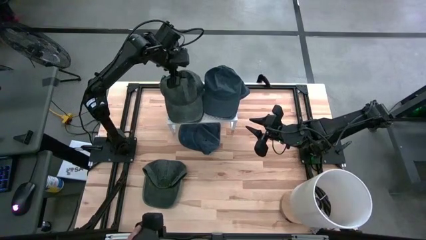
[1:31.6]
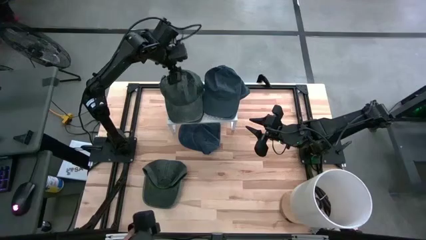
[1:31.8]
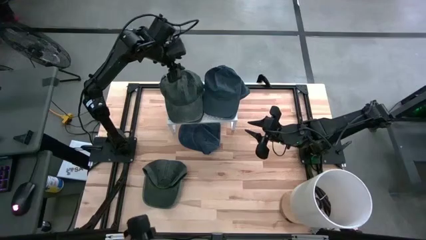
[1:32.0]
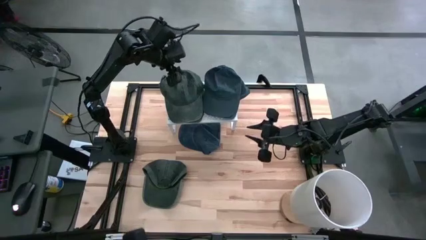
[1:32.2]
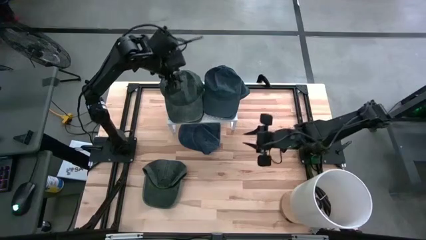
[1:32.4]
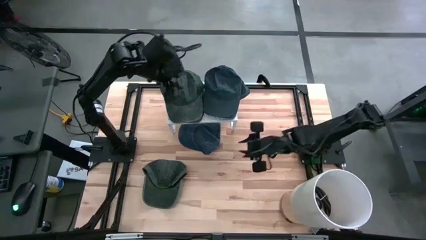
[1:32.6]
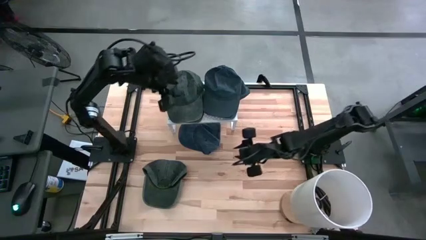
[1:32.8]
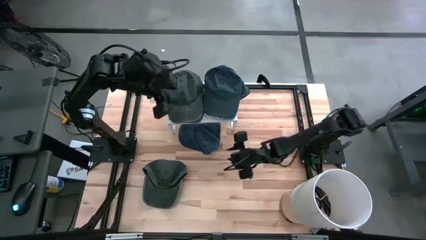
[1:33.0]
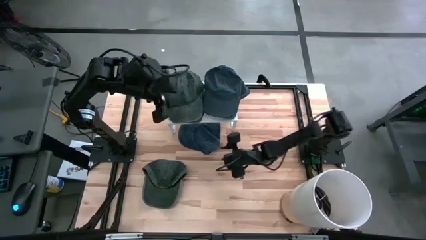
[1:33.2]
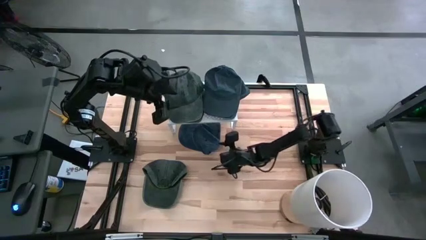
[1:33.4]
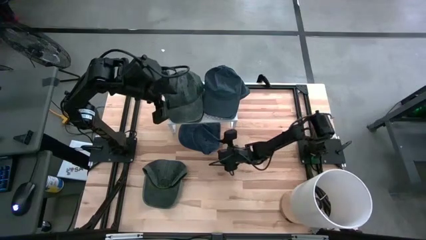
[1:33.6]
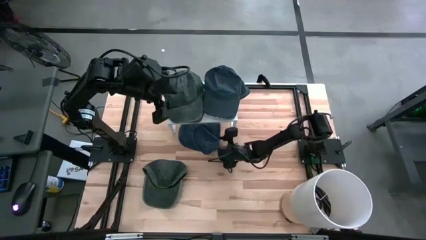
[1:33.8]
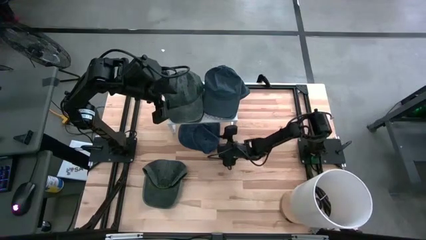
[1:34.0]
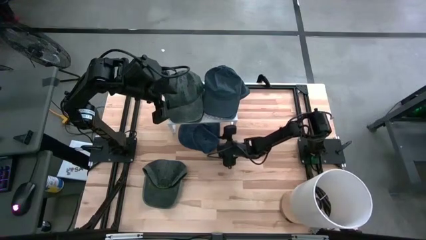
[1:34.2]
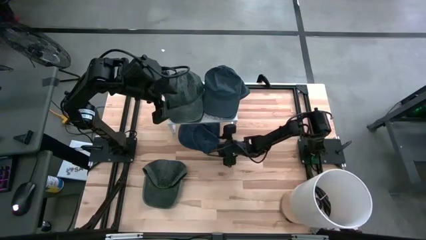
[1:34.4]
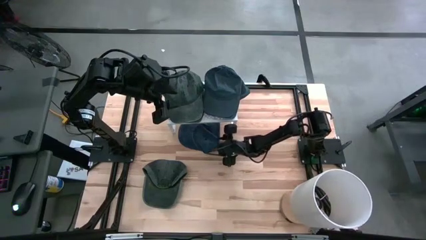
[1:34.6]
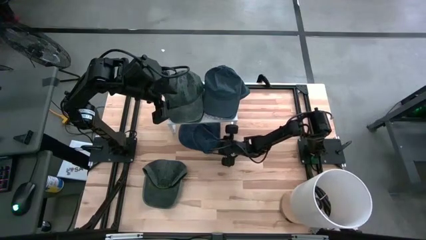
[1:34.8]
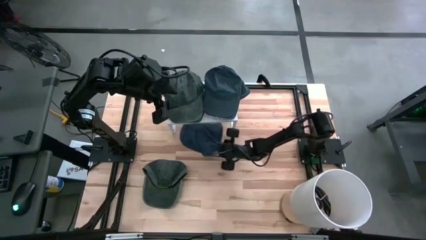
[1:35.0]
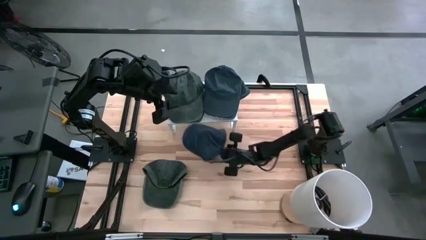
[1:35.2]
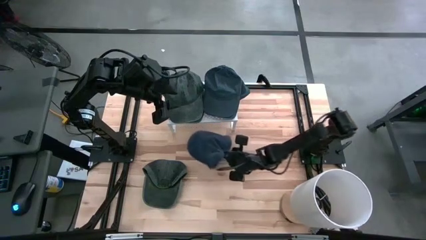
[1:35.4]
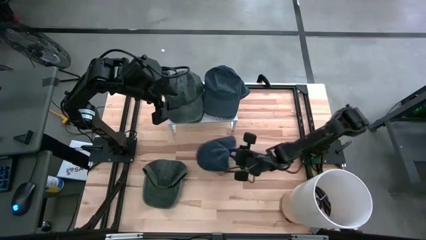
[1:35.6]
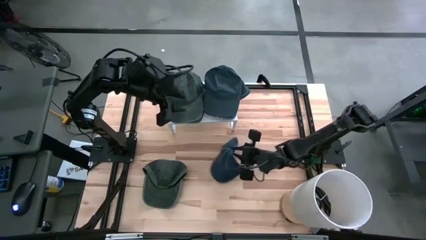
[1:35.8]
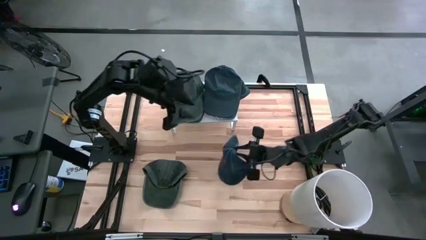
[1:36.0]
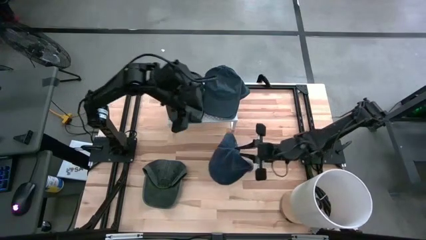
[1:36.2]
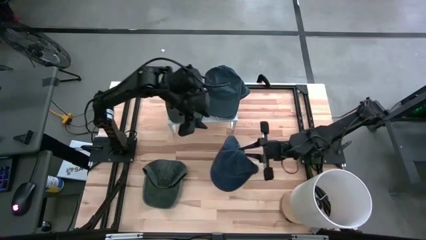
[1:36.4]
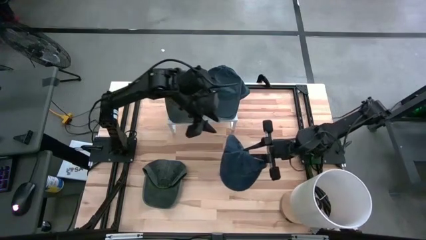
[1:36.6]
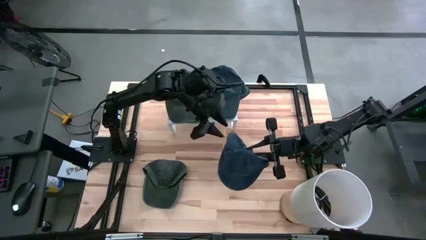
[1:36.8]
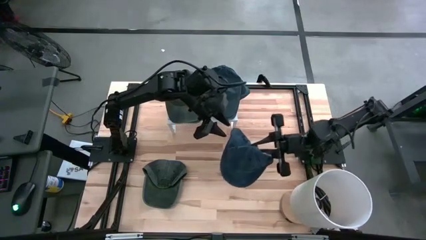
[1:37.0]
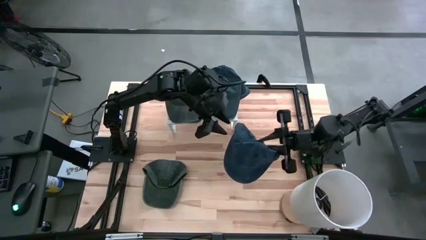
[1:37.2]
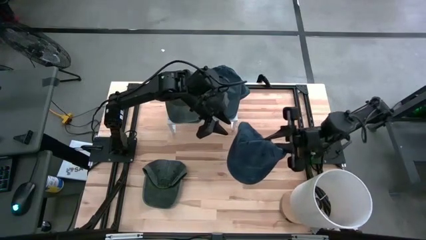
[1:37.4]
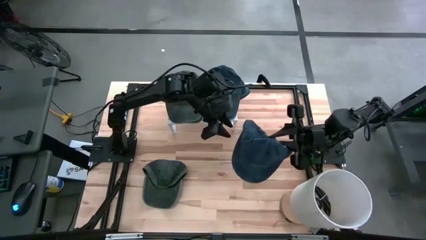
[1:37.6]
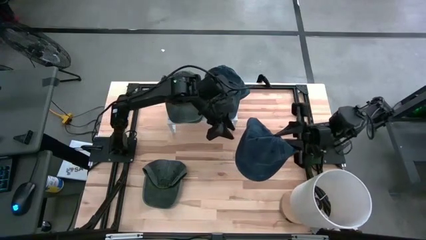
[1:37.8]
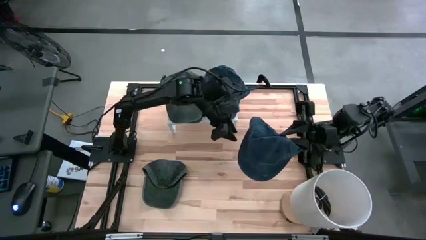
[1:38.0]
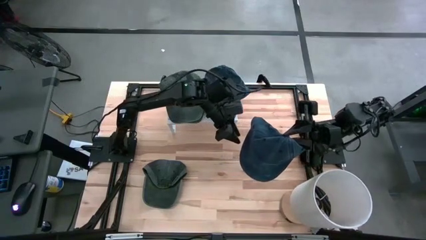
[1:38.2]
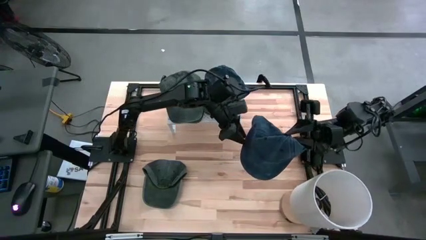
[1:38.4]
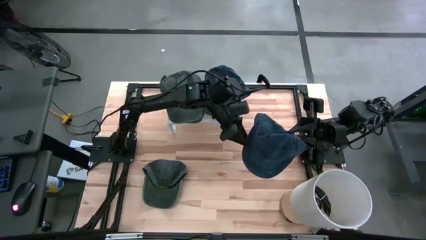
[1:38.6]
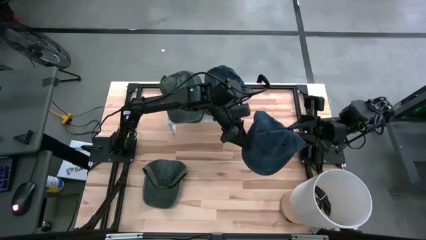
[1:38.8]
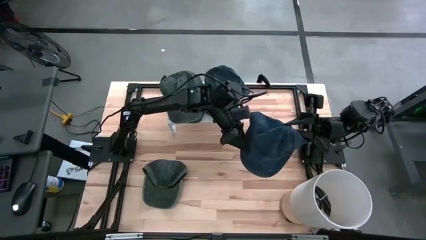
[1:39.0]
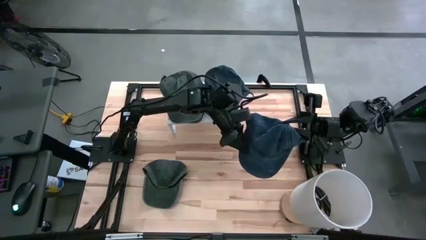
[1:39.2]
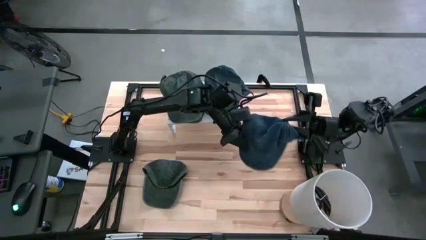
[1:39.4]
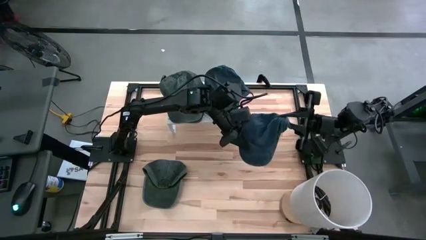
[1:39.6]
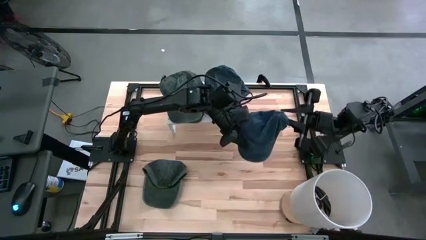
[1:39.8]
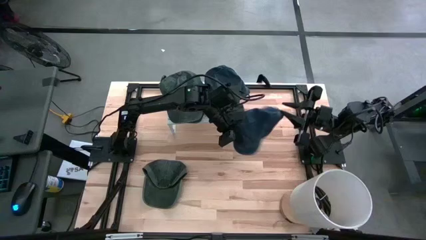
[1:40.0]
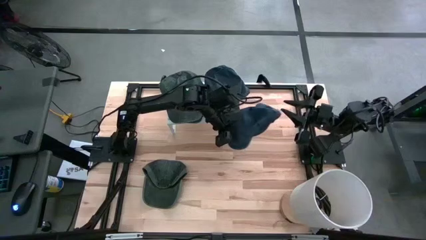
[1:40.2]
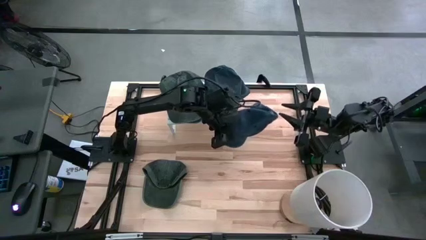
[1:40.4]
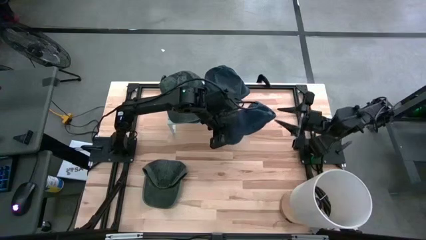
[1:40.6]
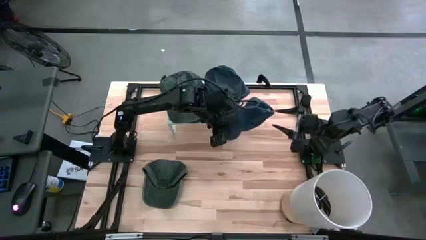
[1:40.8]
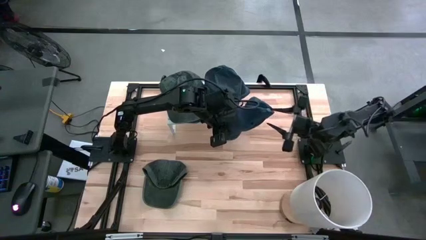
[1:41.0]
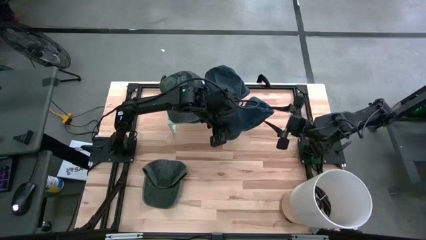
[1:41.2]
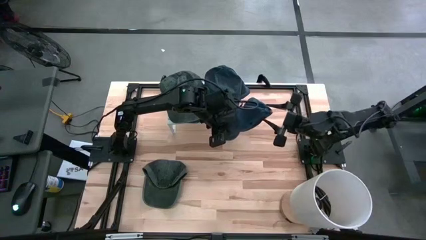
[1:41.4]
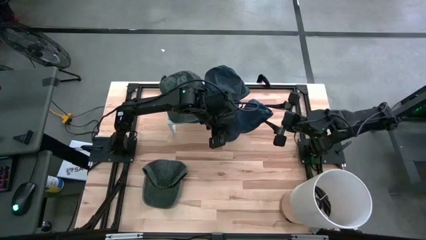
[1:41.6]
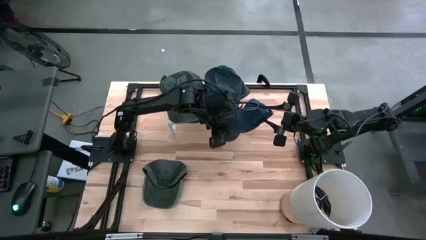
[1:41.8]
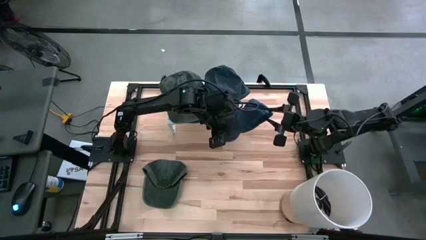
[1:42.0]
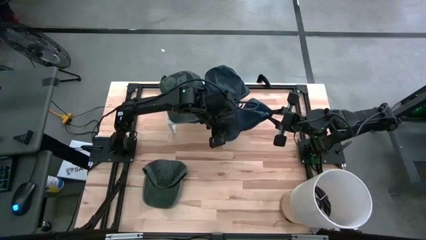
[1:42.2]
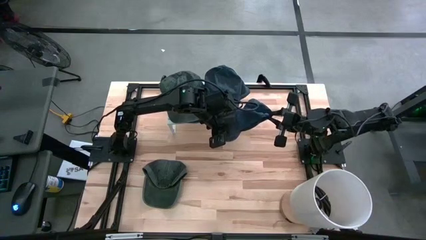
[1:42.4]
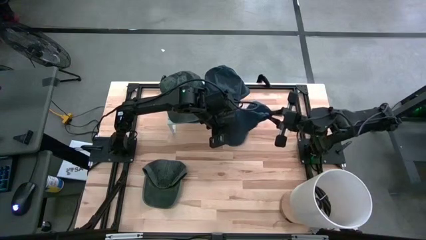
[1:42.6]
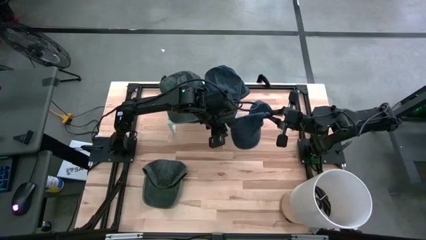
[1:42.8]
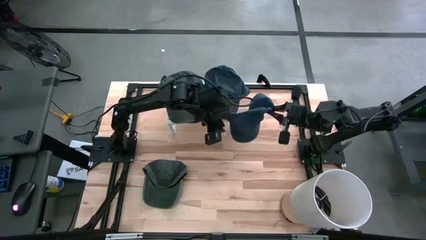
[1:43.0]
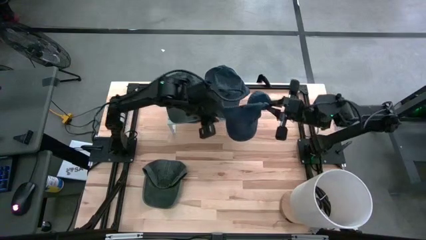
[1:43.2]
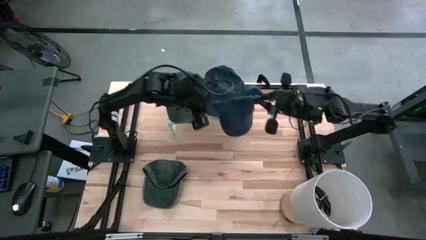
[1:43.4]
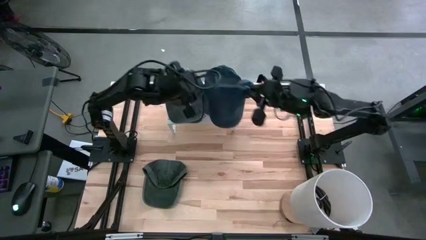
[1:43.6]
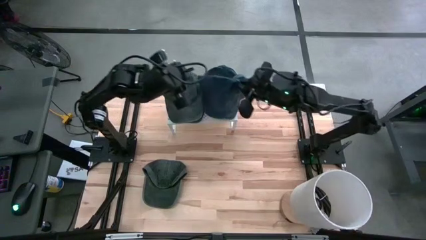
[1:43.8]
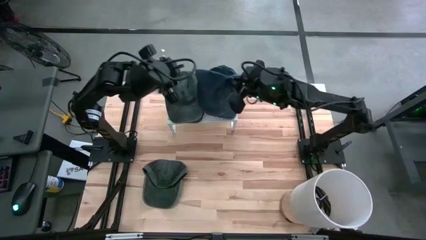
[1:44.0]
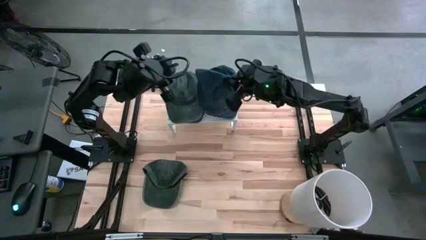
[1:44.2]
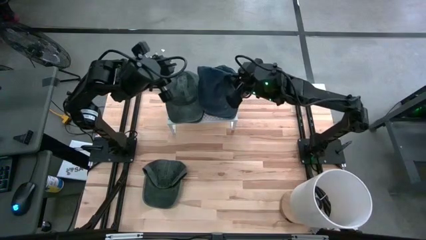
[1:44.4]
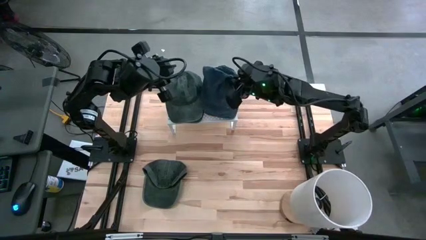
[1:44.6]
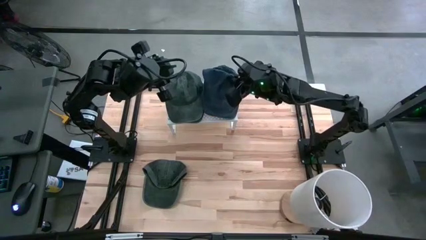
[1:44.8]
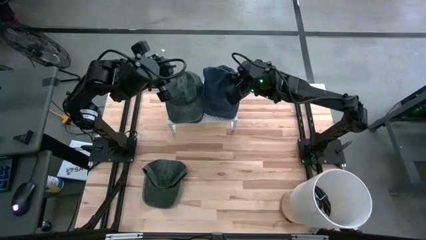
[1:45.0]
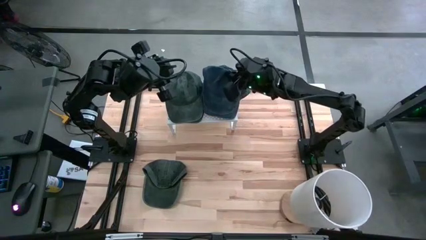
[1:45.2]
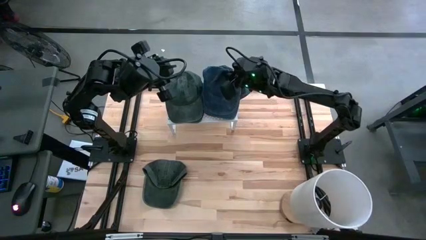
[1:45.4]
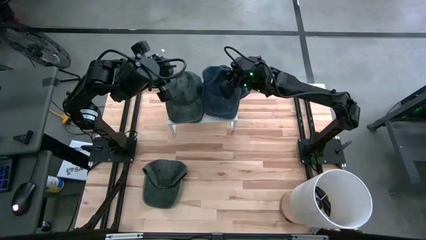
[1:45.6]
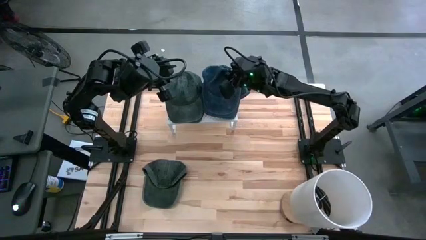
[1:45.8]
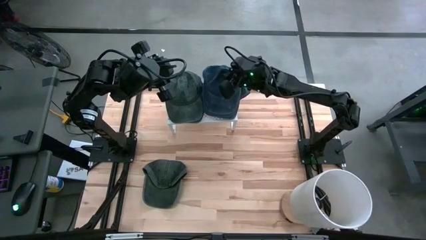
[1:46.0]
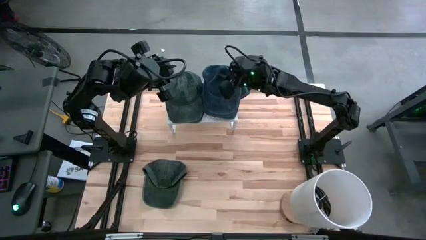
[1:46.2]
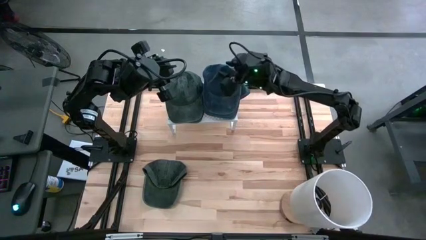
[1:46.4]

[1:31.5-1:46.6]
Task: Pick & Place hat
Stack the blue cap on the blue cap on the shelf

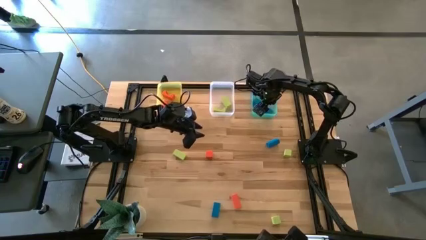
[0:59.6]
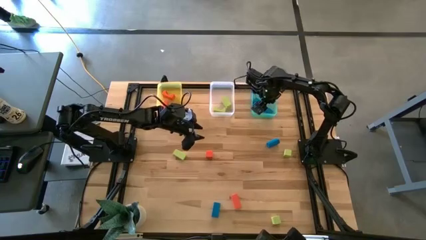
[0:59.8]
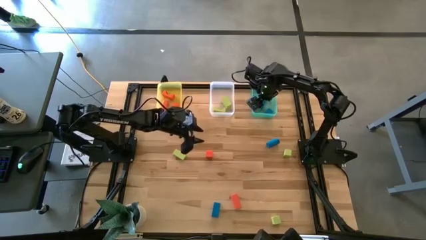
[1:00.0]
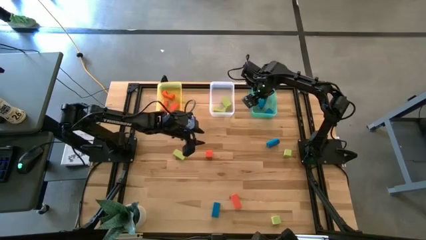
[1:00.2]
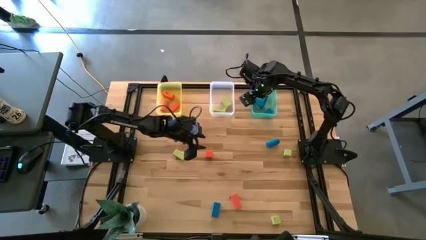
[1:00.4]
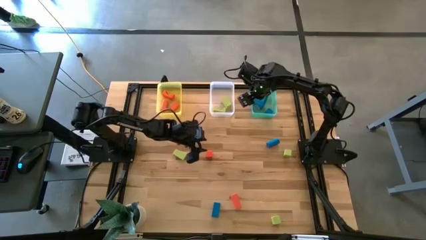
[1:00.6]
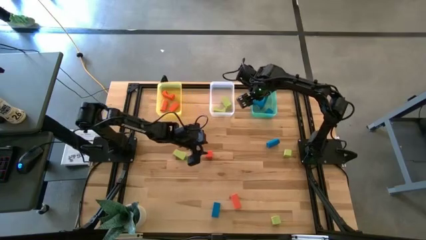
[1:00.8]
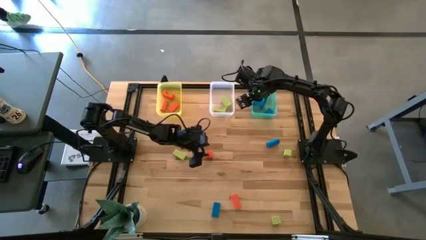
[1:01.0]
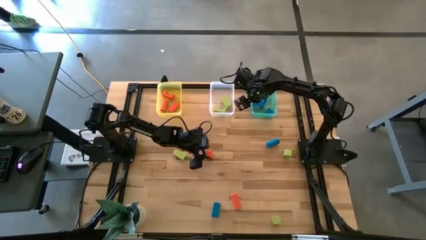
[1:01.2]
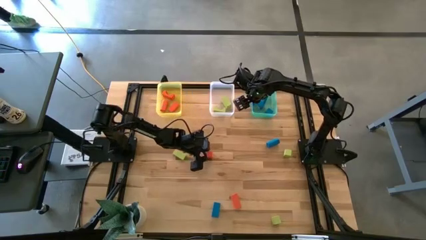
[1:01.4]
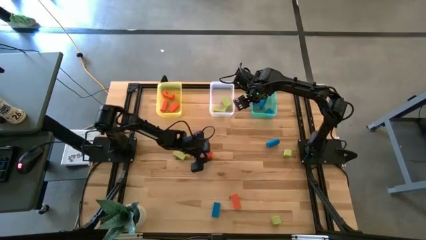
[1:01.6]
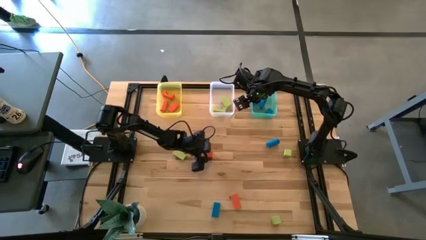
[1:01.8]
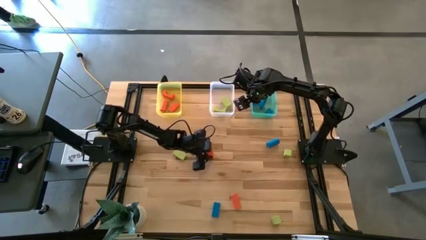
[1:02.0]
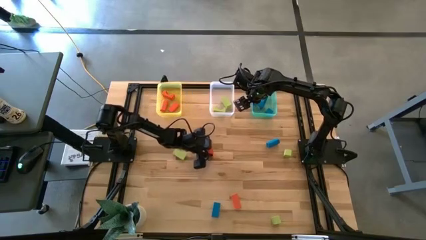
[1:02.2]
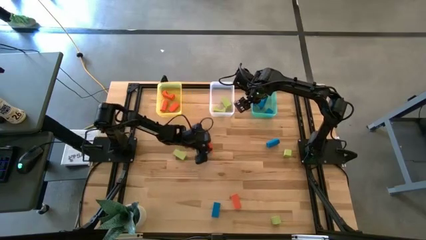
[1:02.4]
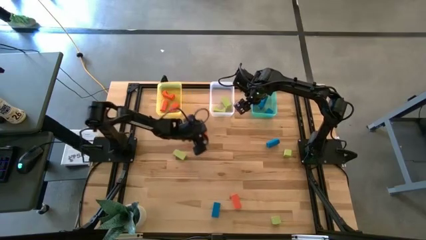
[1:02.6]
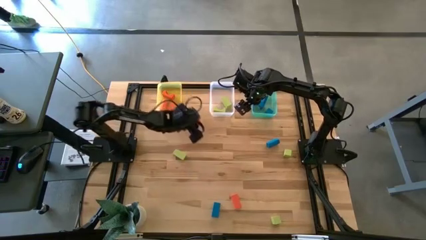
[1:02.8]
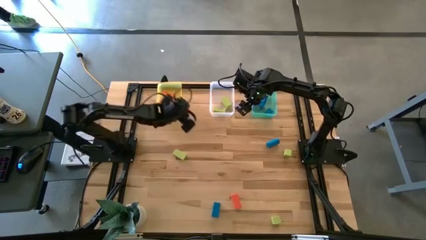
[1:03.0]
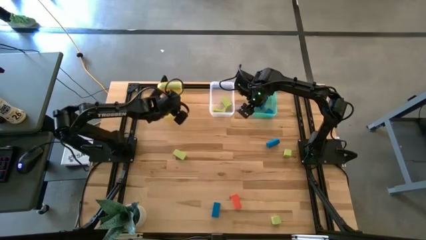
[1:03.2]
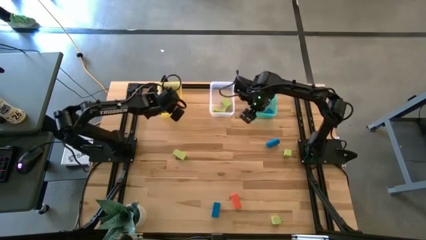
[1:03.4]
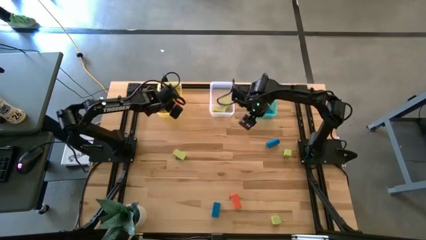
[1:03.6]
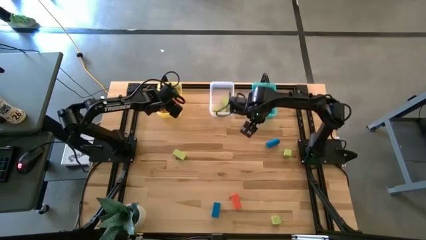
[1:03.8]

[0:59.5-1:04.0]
Task: Sort & place blocks by color
Put the orange block into the yellow bin
